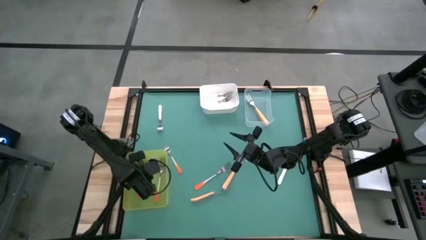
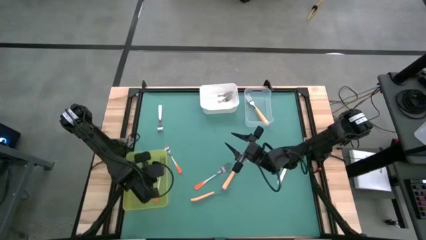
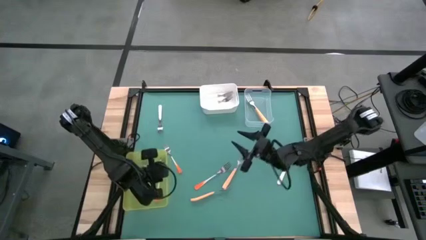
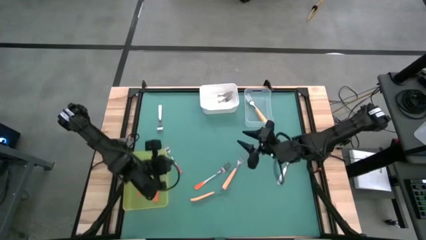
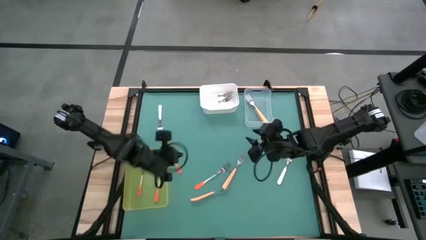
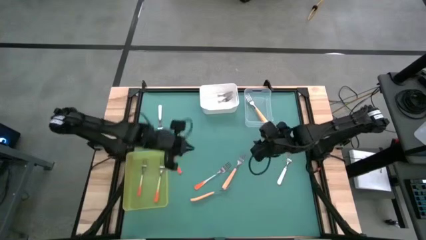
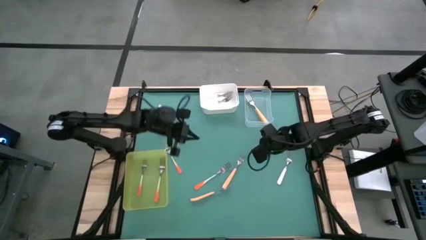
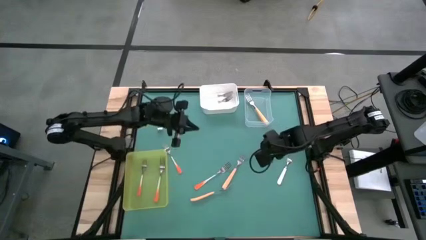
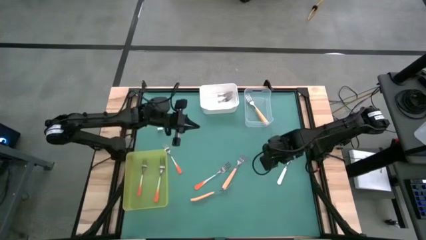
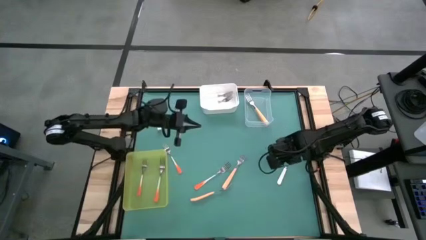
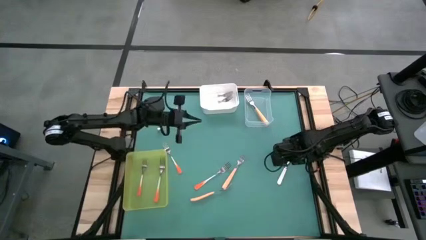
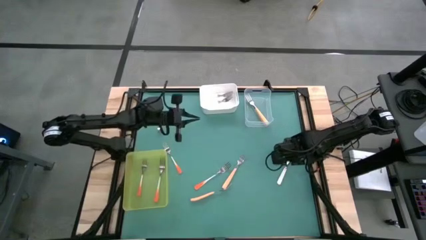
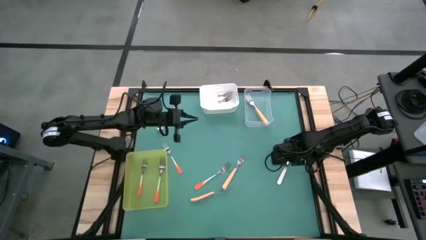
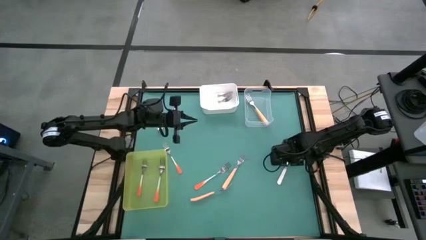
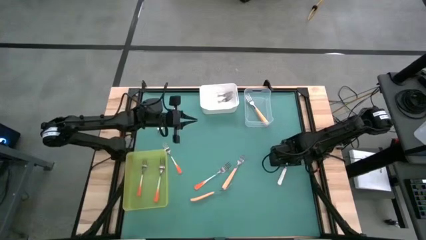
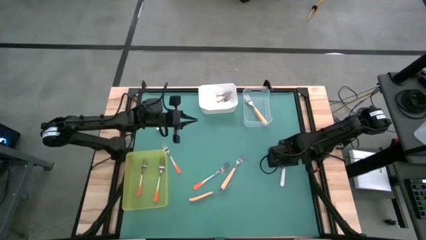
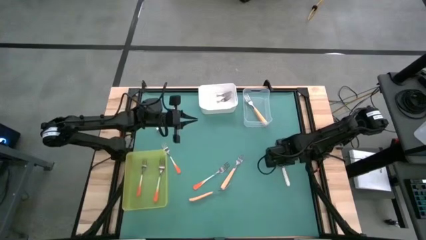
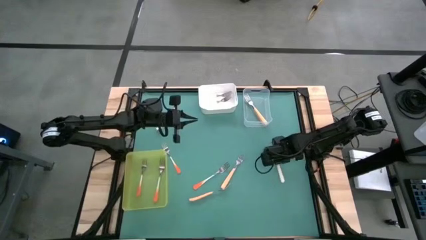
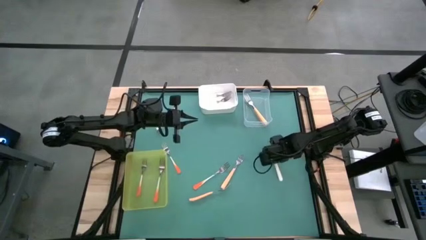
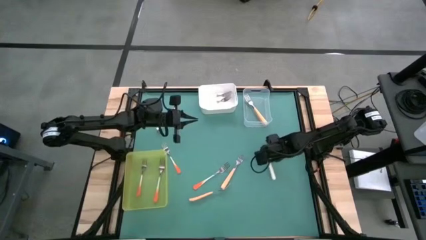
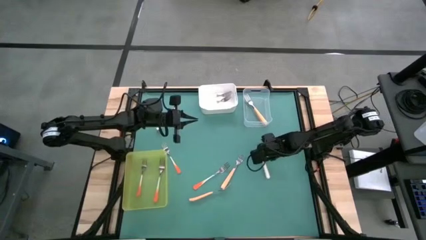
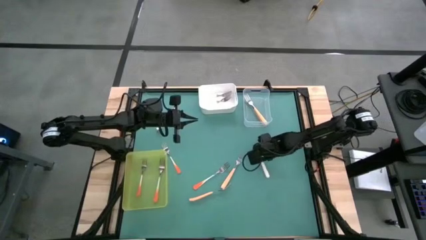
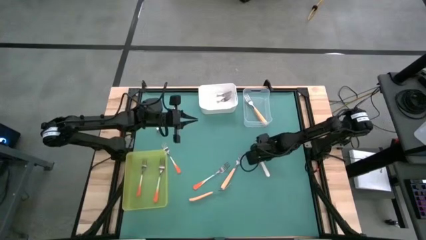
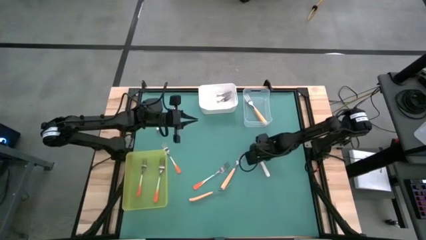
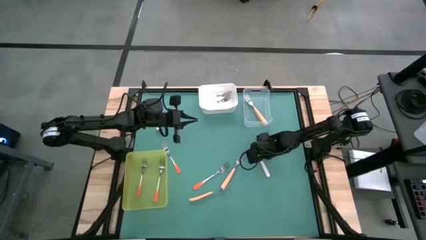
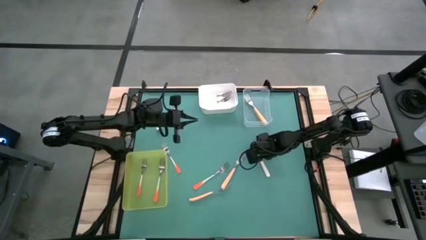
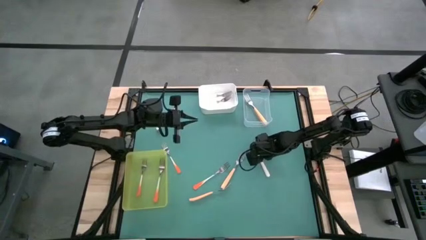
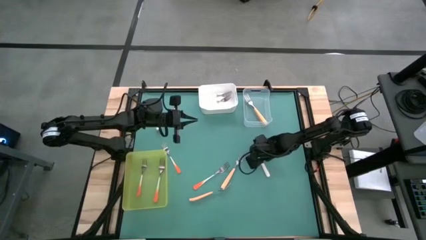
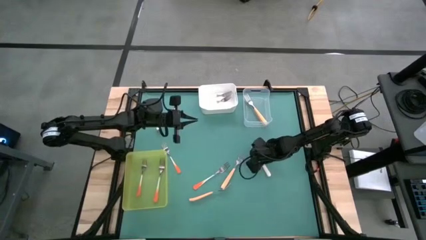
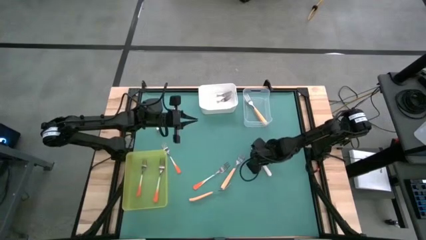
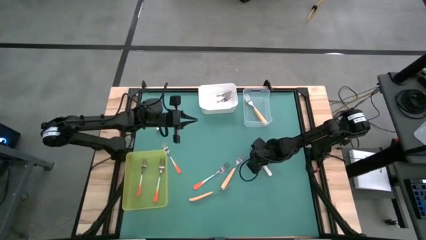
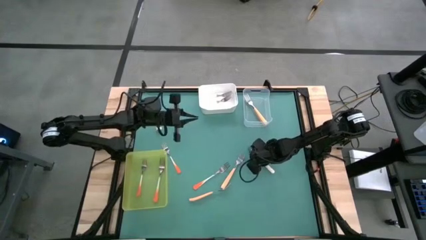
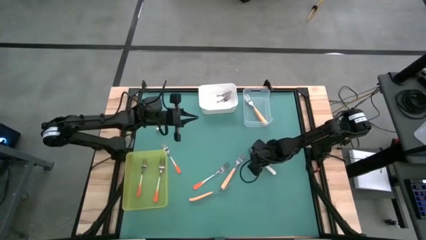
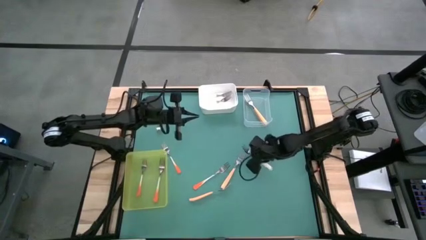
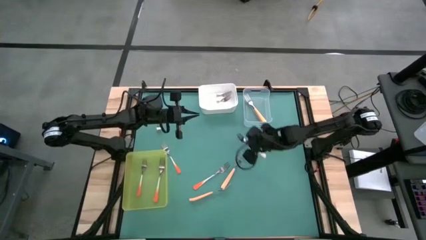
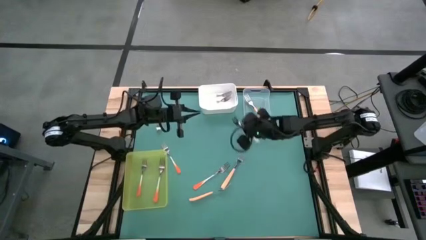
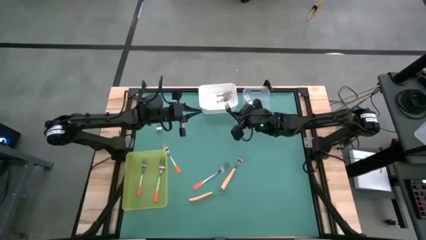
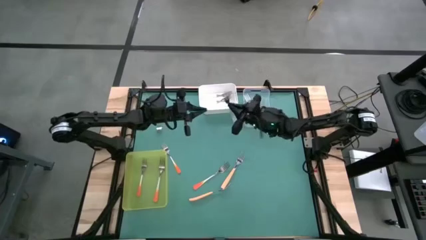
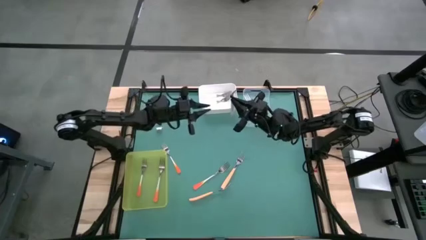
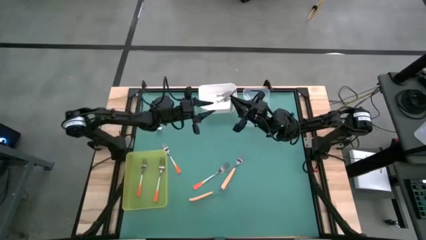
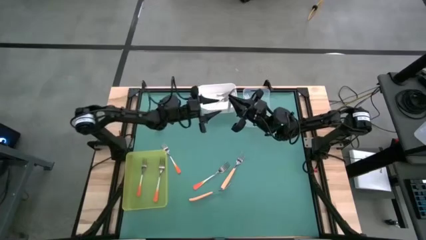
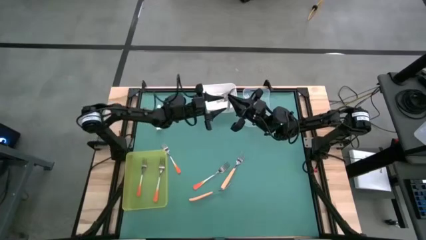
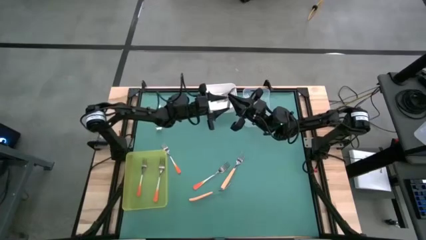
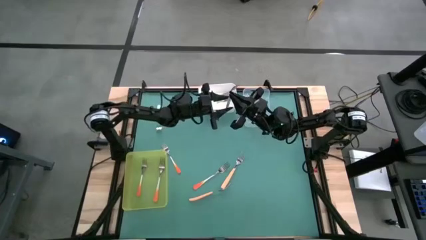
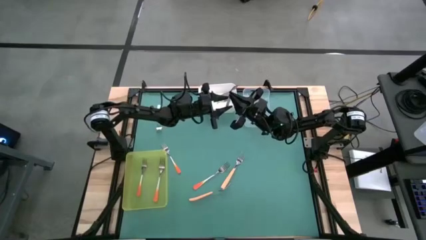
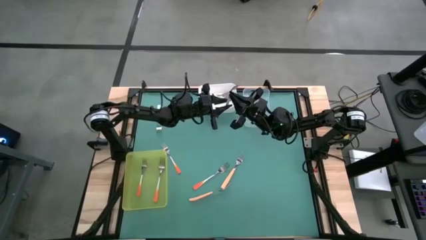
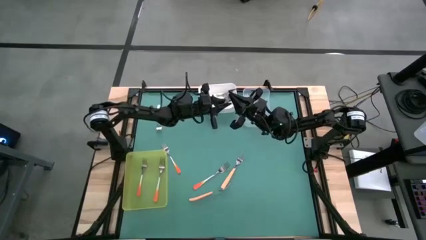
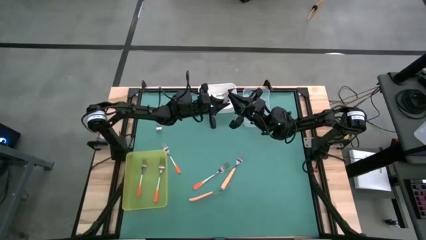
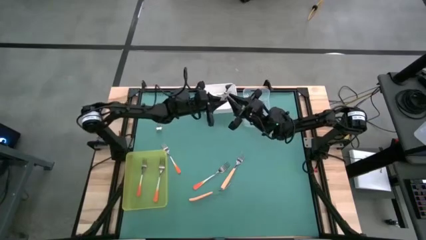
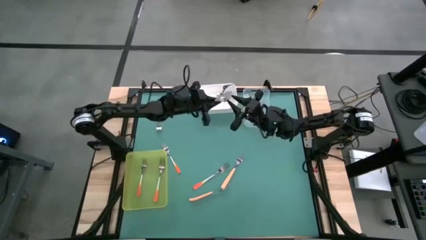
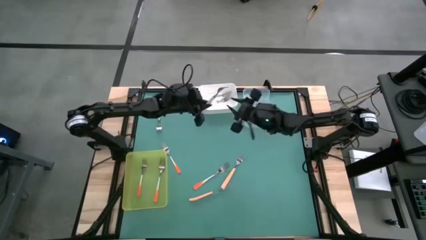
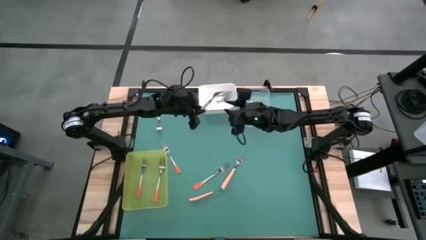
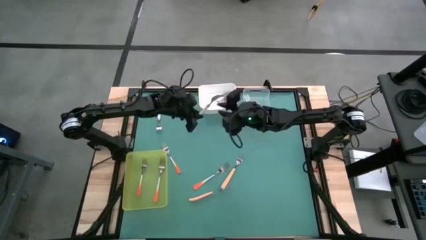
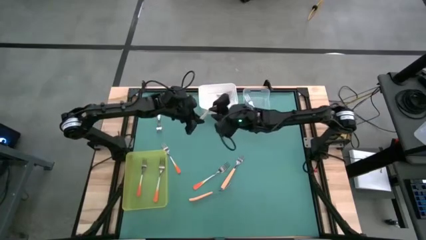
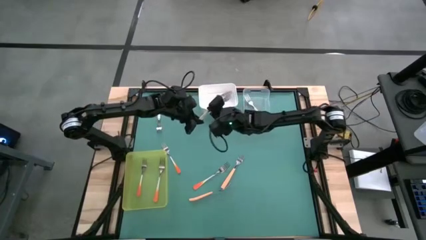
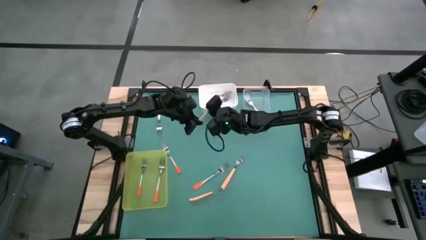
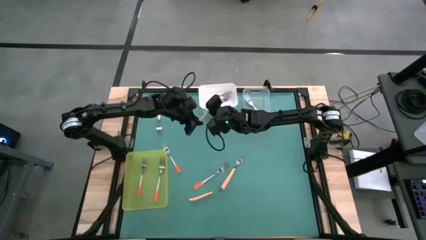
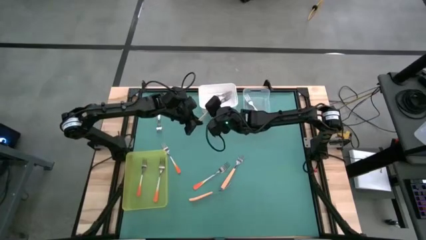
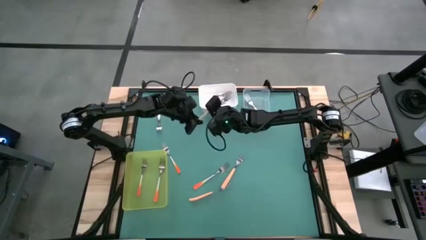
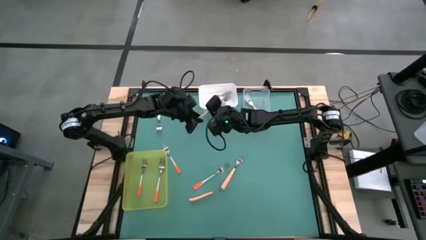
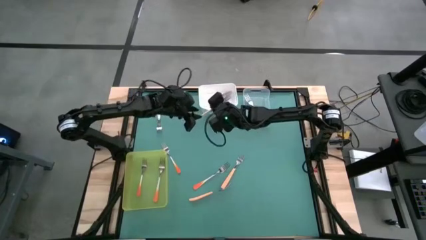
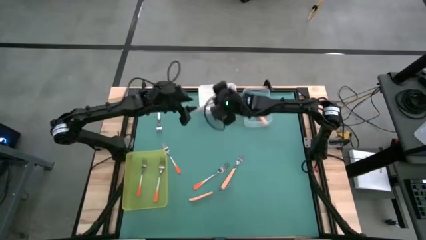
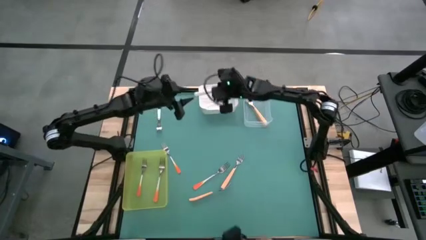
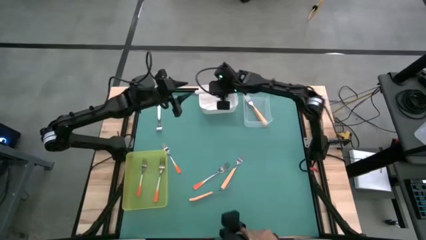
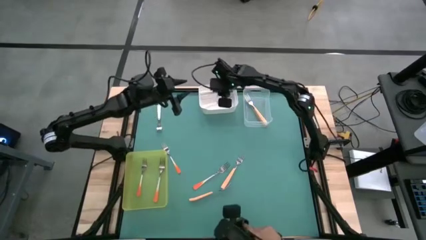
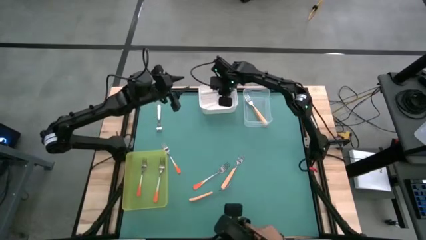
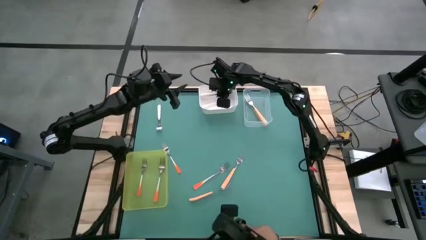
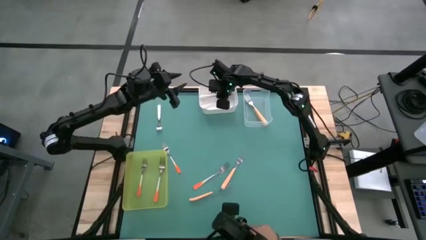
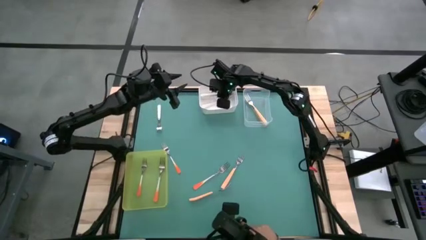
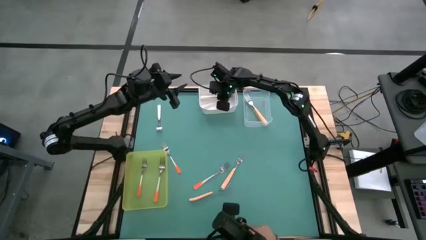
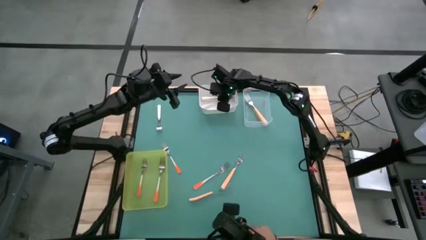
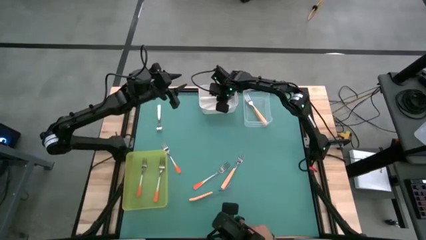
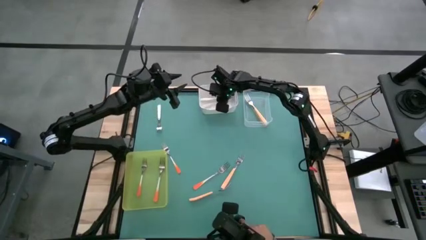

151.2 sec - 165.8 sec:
Task: Sort silverware by color (type)
Put the white fork into the white bin

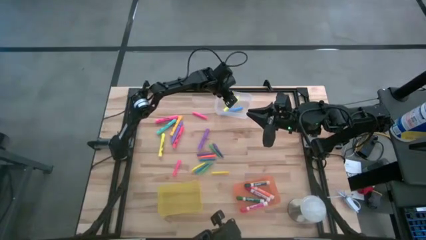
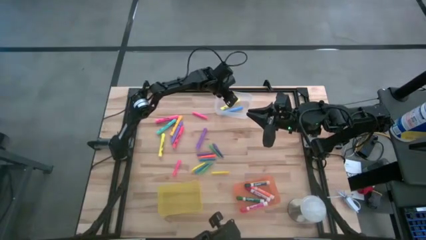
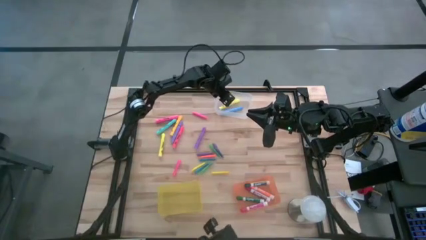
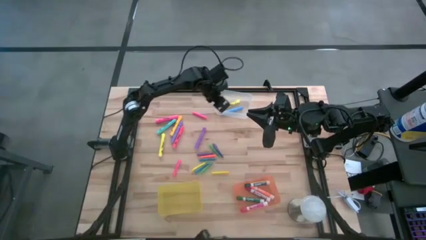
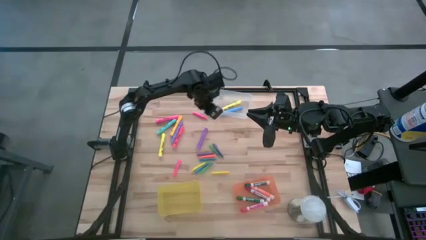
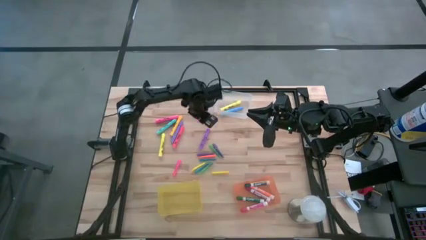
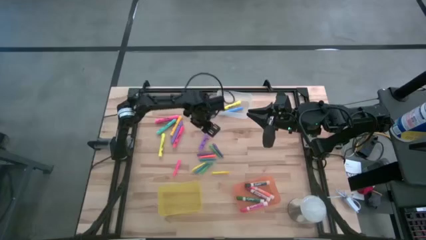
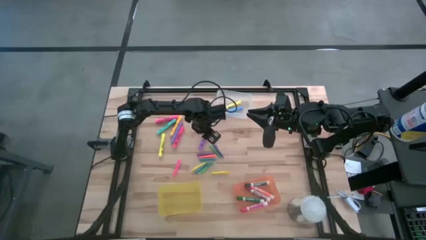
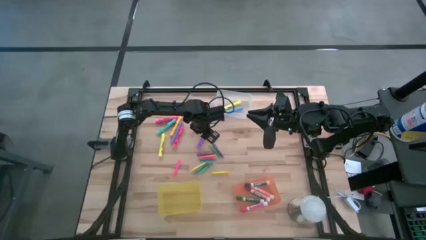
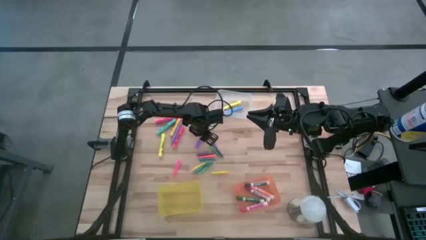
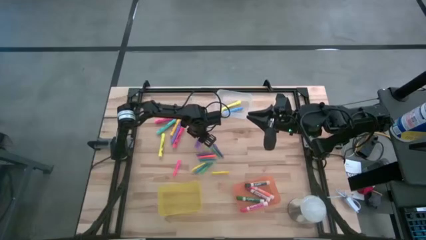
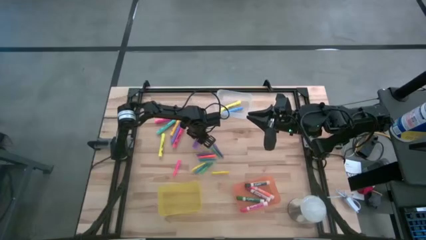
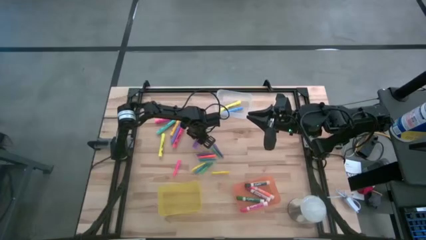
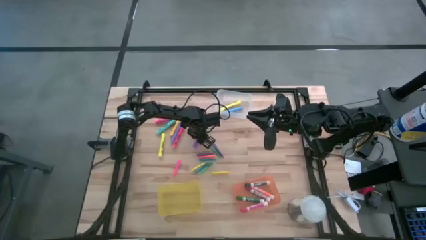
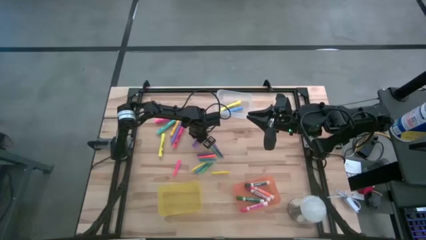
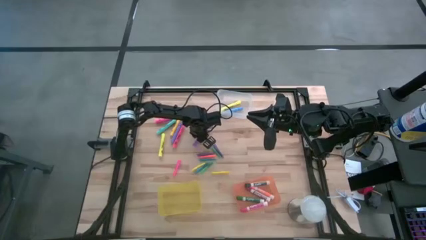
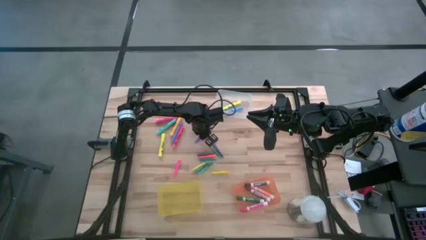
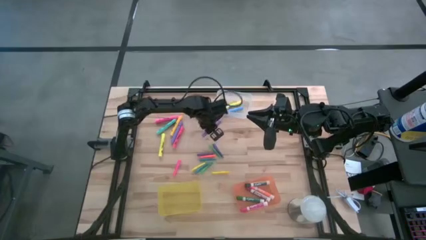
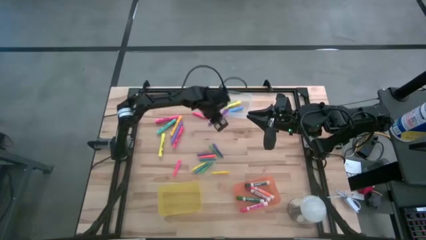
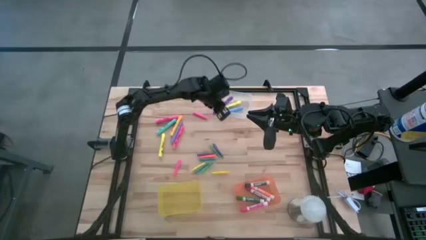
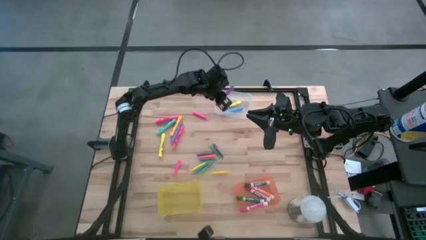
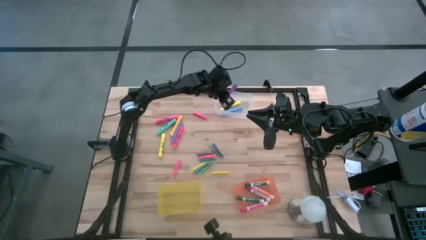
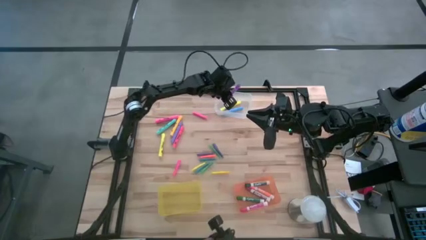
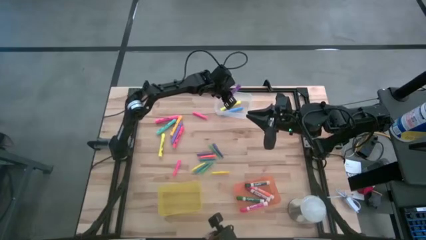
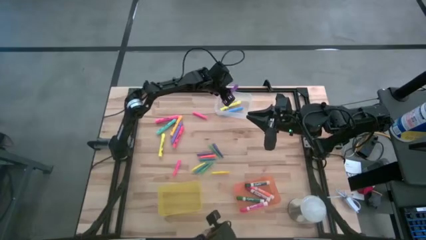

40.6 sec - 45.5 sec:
Task: Pick & Place Markers
Put the right purple highlighter pen into the transparent bin
